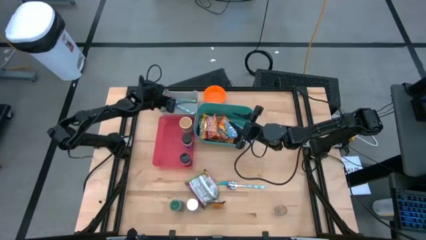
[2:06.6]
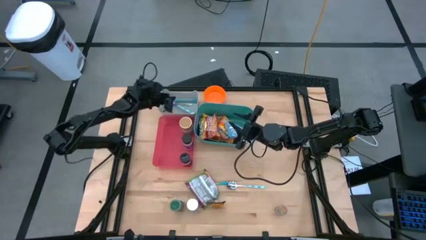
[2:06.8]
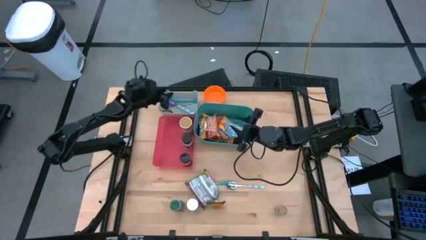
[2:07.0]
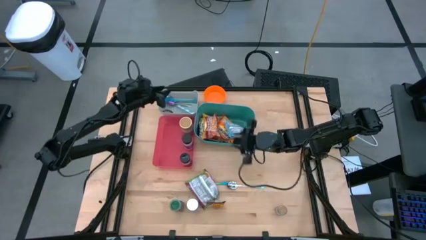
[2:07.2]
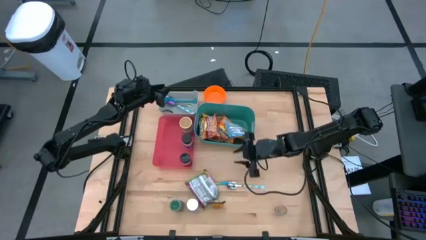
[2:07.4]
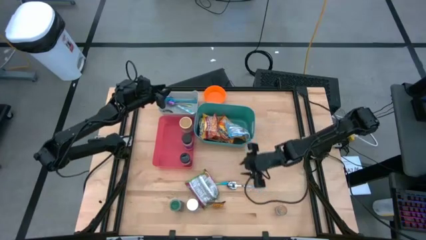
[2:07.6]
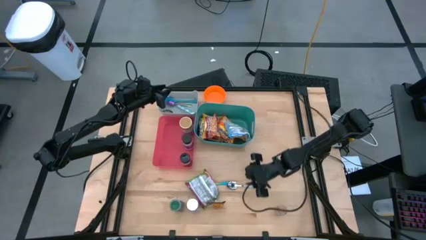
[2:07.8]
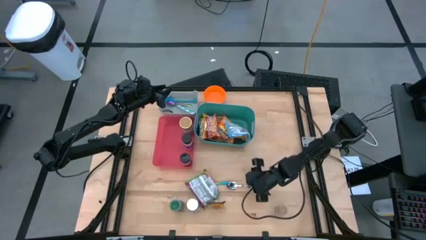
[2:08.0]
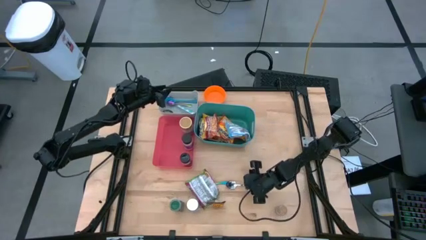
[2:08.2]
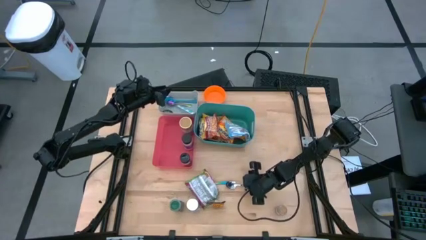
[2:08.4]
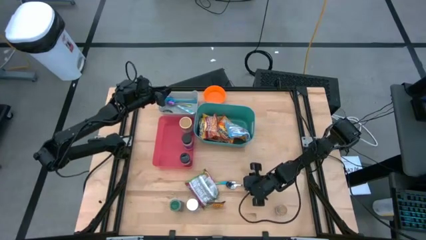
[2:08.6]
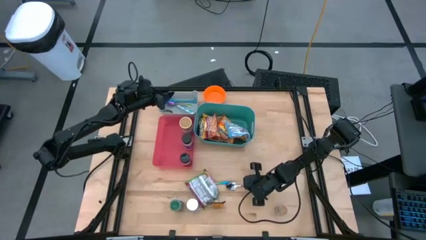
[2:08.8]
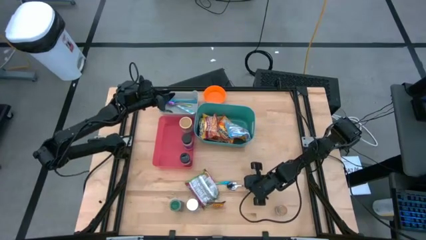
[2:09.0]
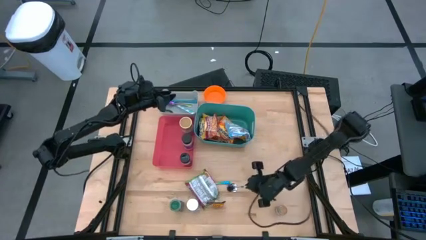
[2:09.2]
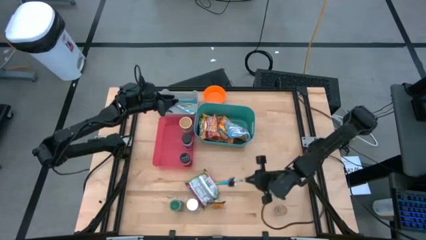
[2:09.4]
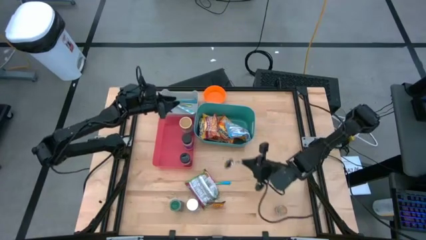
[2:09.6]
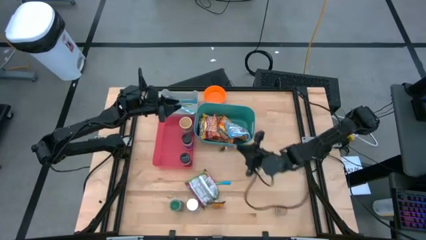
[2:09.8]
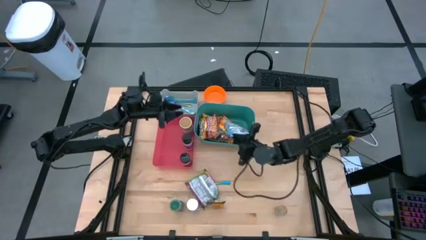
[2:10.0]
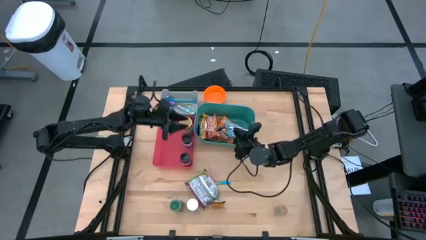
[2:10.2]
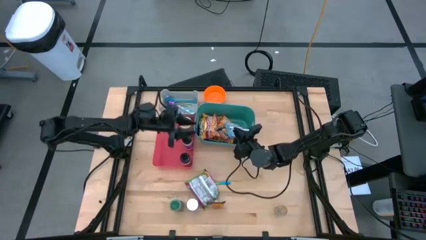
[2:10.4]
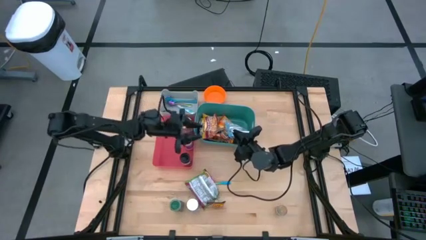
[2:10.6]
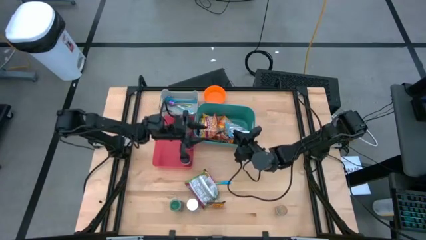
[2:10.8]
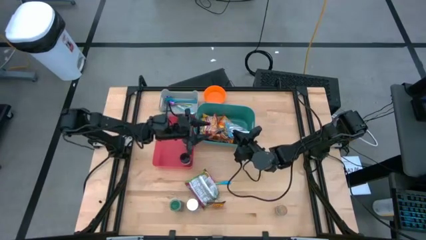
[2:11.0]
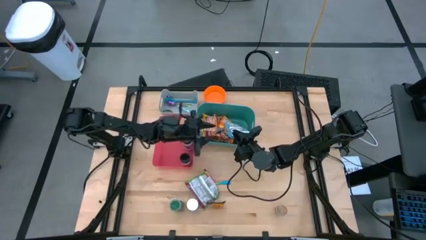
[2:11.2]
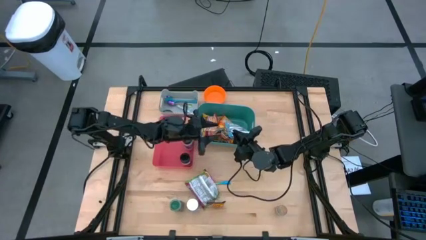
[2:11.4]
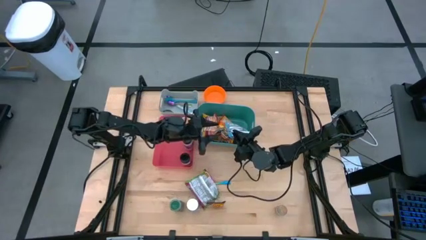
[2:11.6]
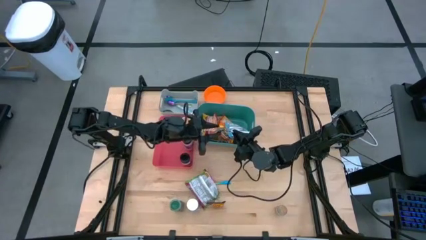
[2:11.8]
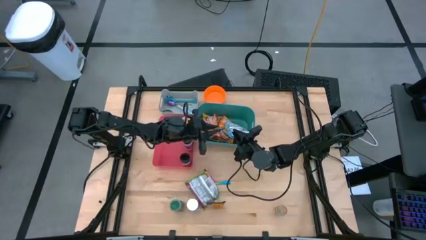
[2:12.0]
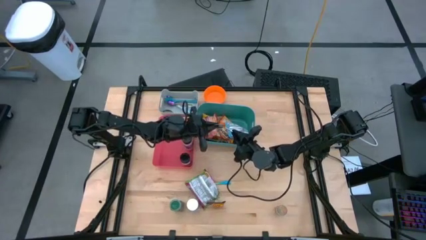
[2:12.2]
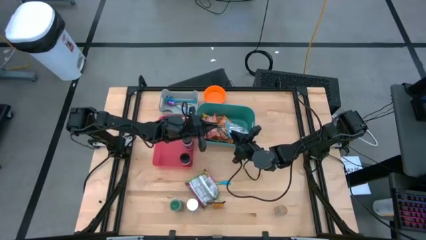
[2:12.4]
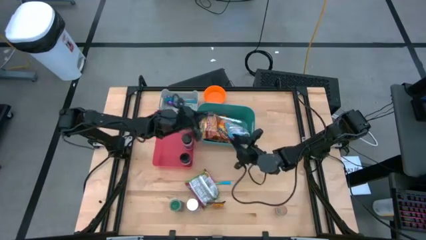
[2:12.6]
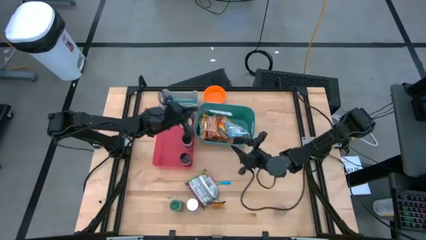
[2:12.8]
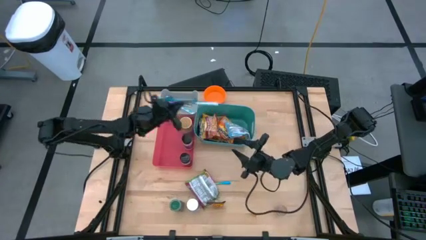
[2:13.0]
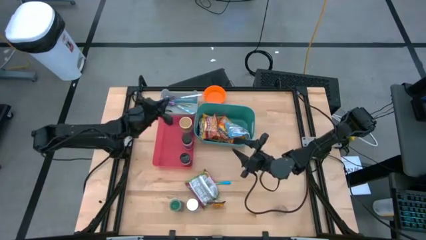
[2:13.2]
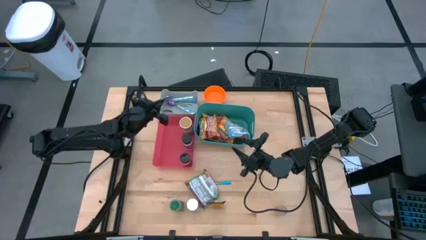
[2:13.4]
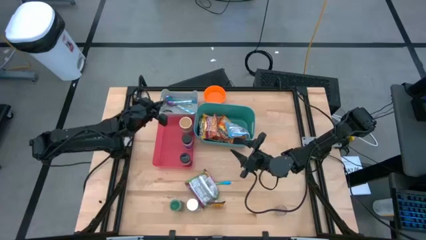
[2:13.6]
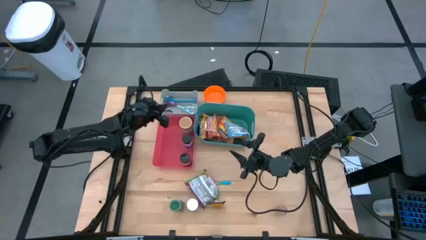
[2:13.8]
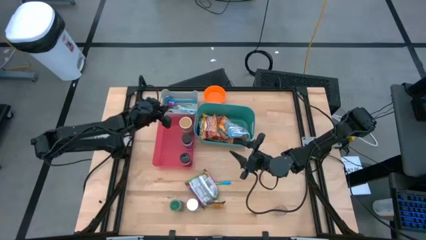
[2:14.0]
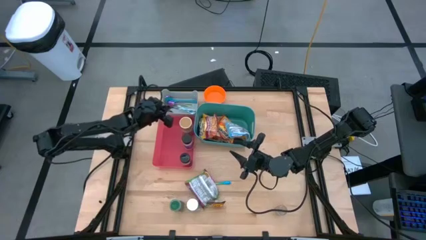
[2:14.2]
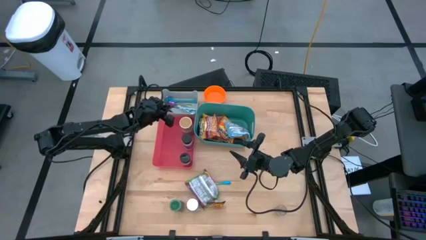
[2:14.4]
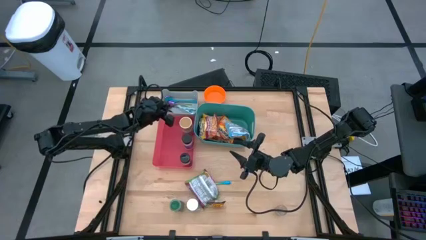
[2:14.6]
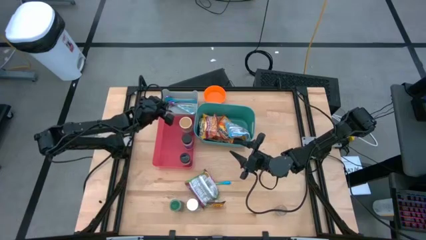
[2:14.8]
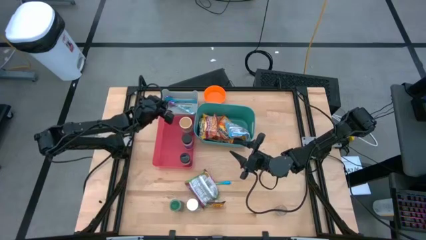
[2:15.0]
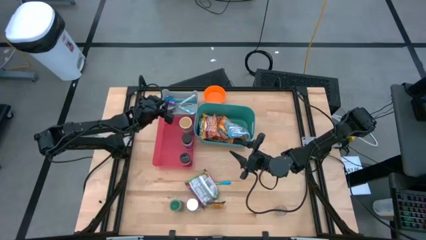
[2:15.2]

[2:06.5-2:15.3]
Task: Pick & Place Food Item
Put the blue patterned spoon into the gray bin

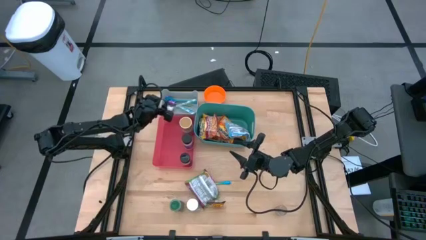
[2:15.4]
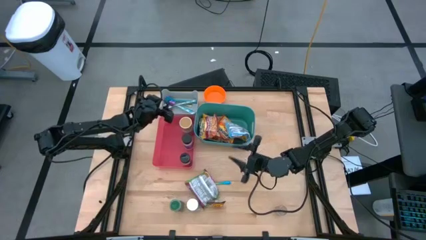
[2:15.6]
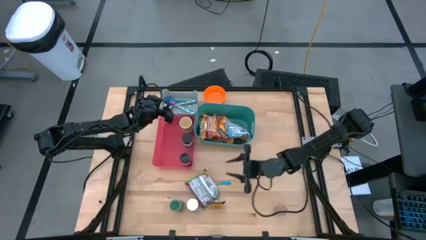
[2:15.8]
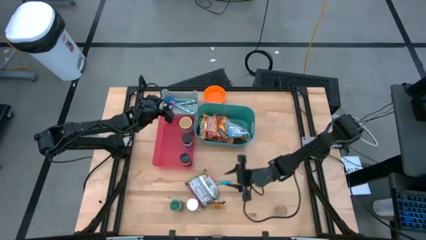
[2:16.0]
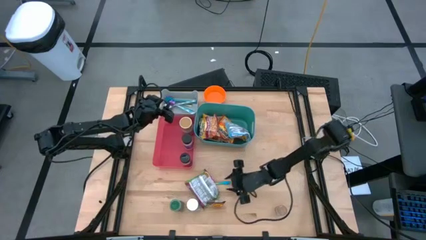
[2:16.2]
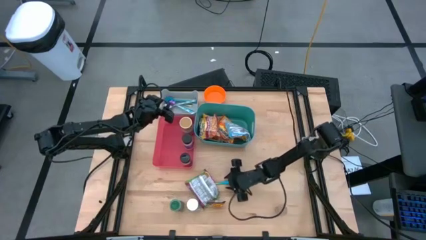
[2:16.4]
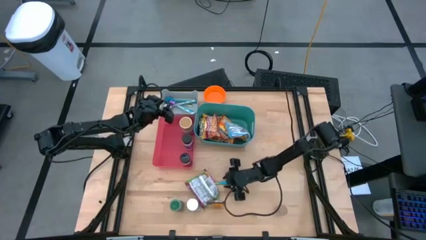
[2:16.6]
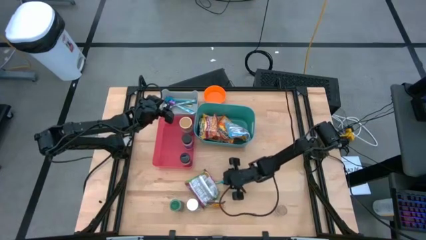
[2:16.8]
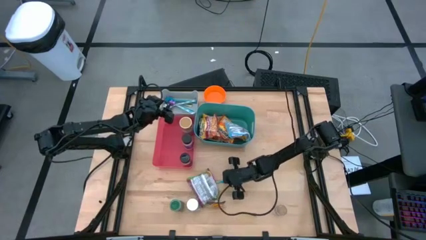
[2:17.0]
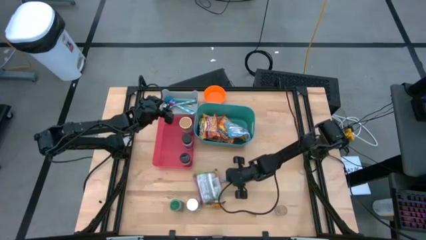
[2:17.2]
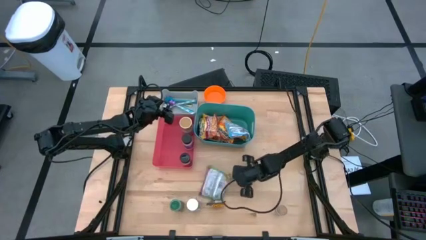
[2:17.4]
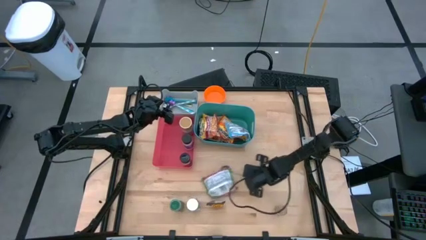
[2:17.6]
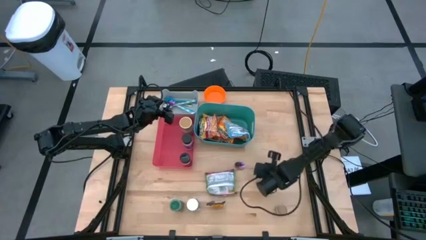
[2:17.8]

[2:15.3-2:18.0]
Put the violet spoon into the gray bin

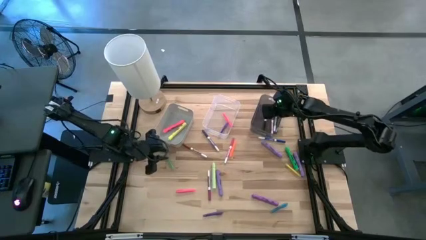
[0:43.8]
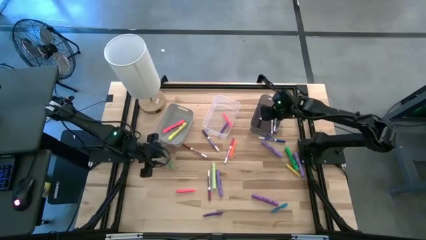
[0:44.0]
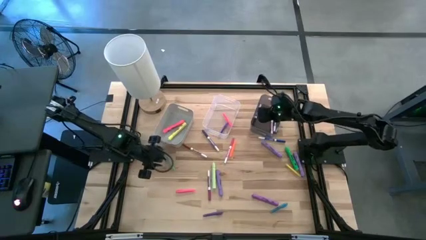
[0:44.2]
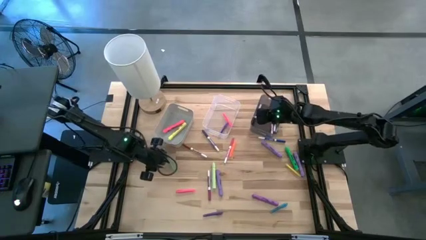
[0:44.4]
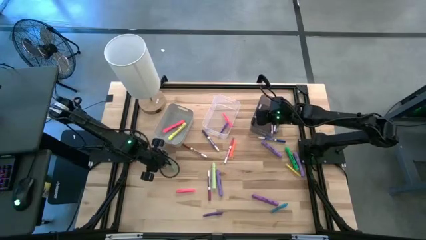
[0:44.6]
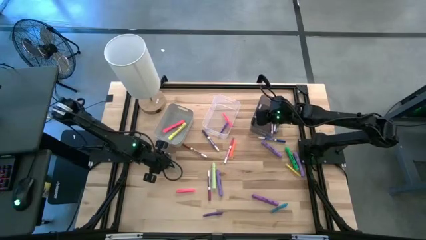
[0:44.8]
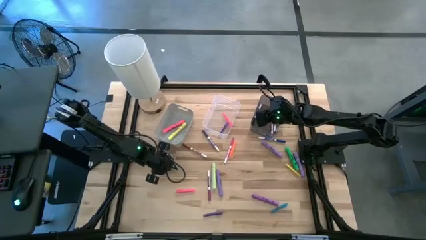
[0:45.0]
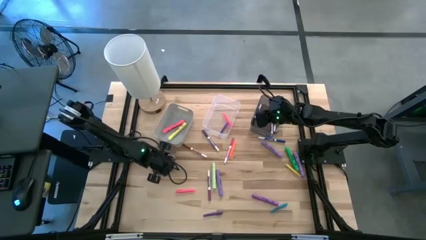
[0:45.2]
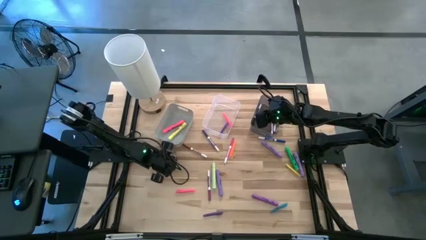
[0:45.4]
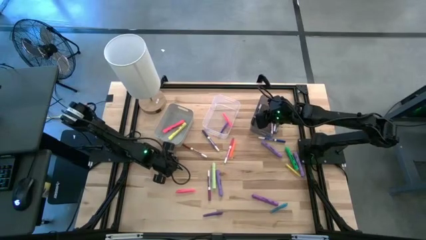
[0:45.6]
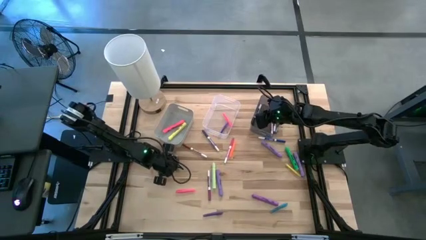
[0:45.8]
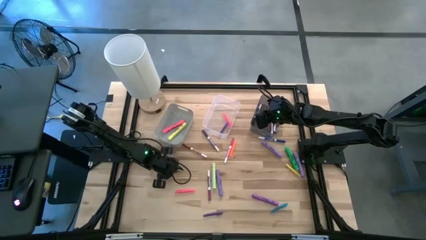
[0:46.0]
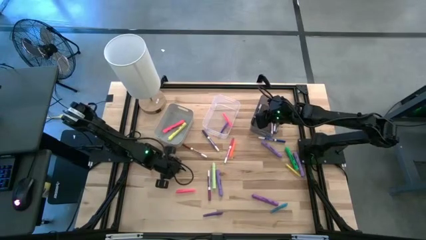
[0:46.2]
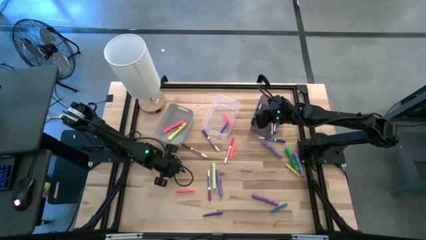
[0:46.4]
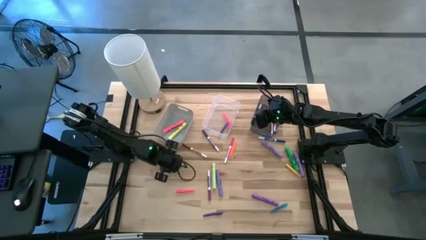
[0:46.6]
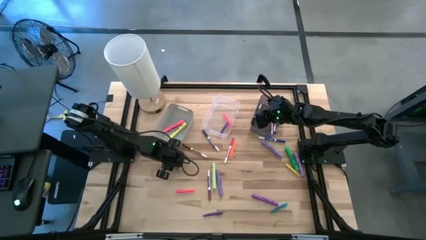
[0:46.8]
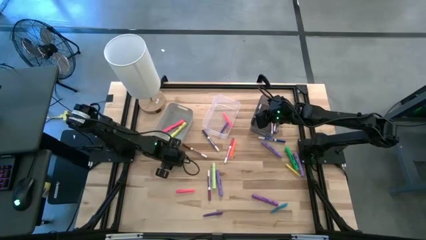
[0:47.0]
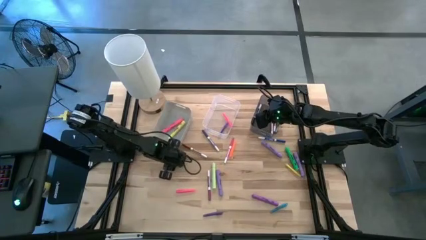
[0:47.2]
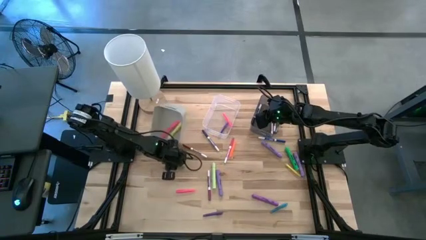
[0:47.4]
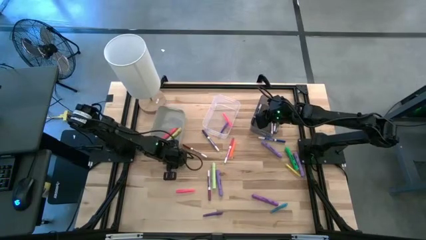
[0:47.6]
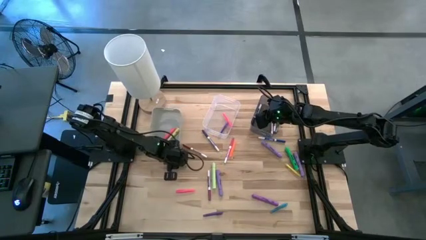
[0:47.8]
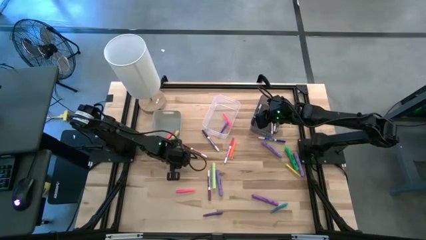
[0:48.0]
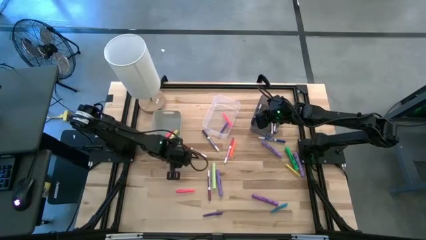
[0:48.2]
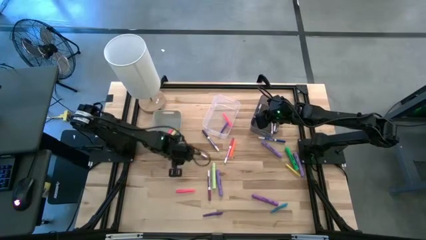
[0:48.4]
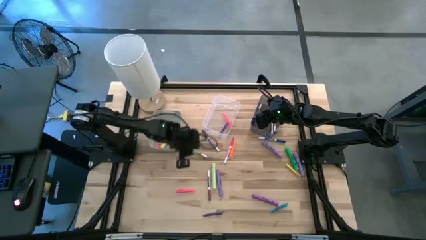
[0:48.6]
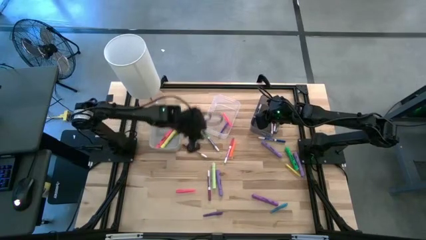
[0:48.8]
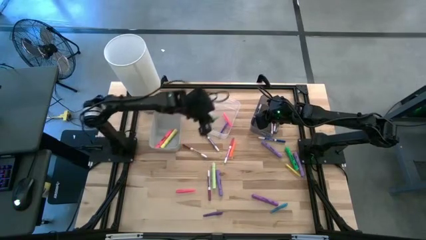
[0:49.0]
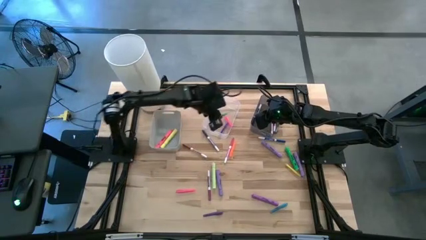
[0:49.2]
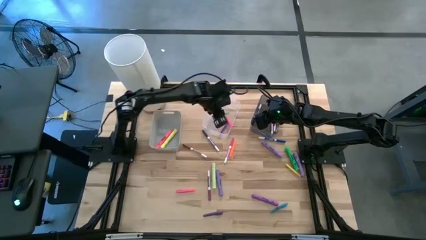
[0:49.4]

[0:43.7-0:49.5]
Task: Pick & Place Markers
Put the green pen into the transparent bin
